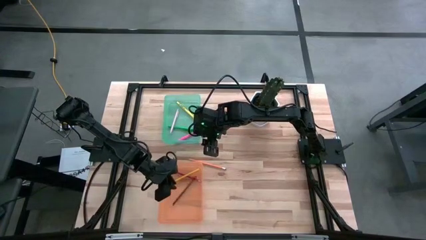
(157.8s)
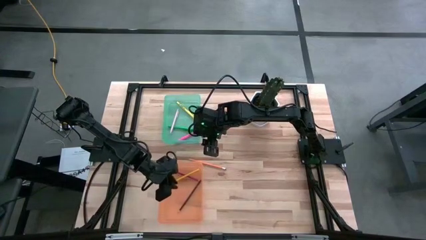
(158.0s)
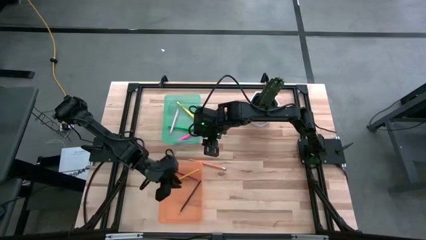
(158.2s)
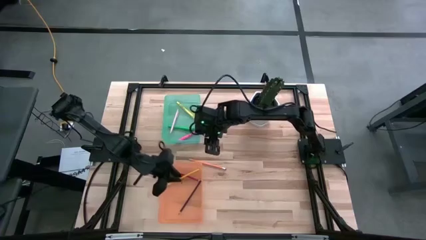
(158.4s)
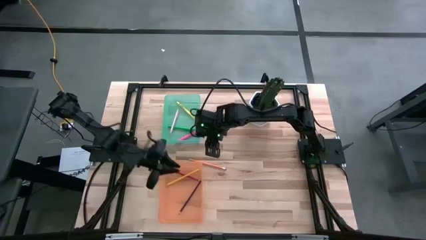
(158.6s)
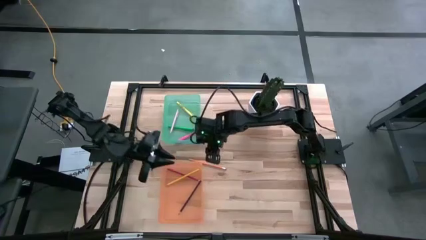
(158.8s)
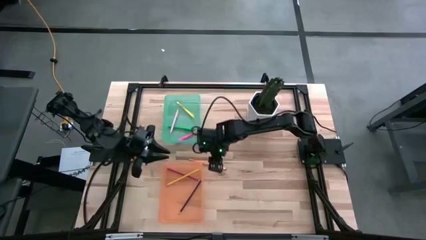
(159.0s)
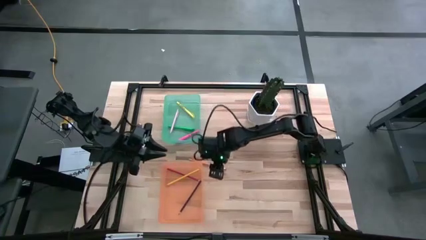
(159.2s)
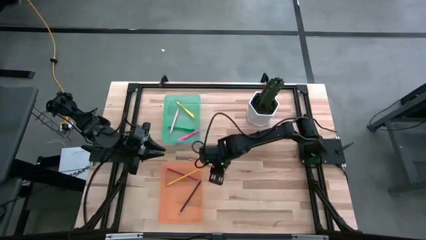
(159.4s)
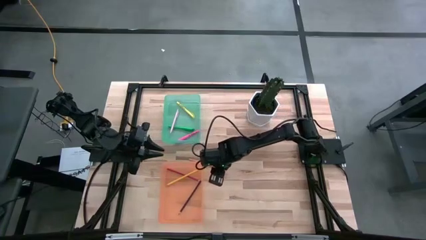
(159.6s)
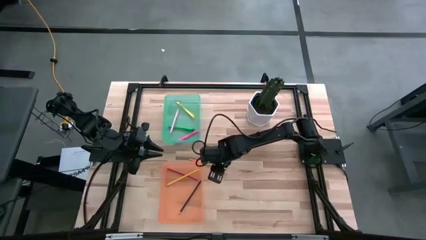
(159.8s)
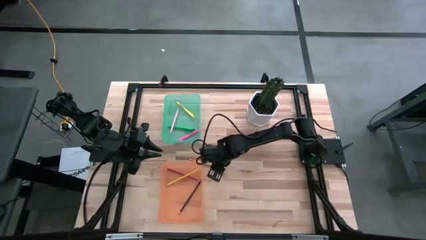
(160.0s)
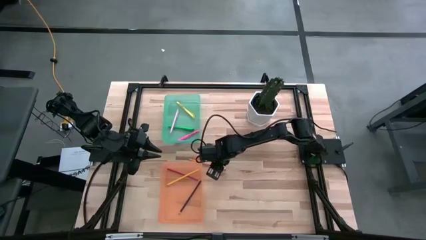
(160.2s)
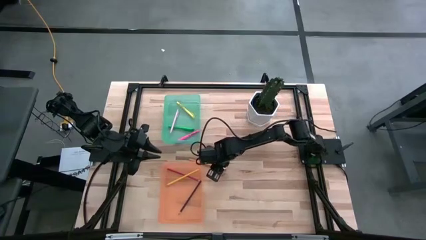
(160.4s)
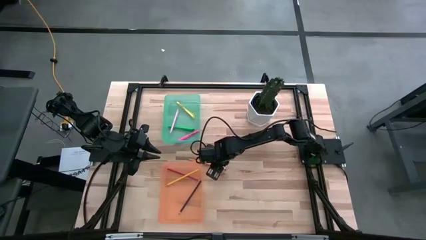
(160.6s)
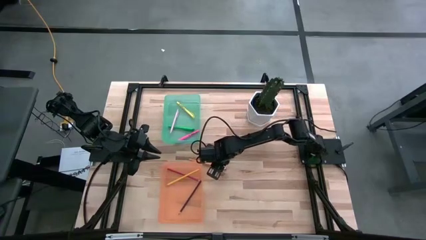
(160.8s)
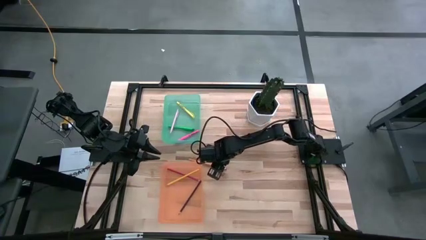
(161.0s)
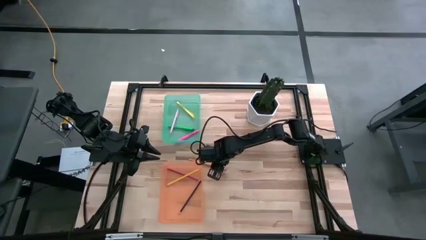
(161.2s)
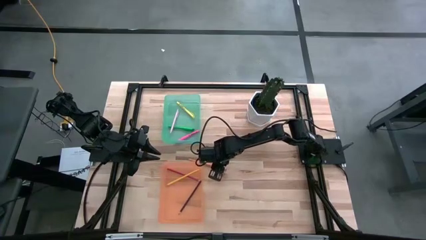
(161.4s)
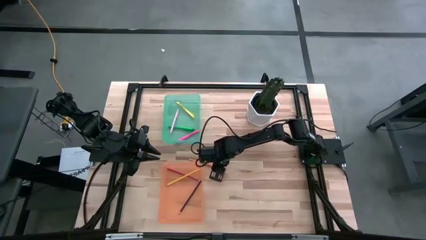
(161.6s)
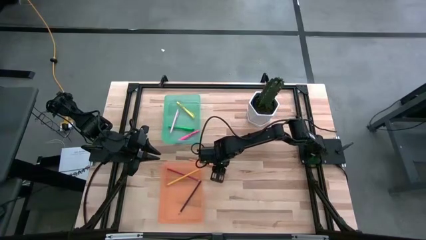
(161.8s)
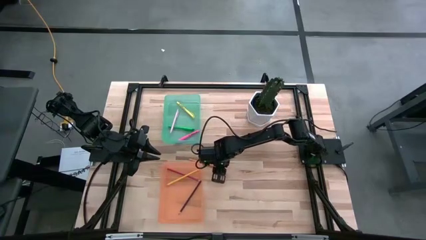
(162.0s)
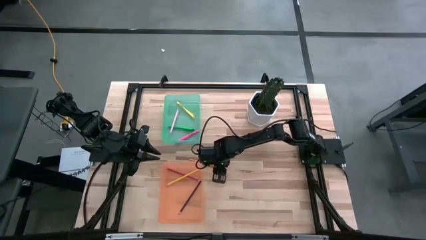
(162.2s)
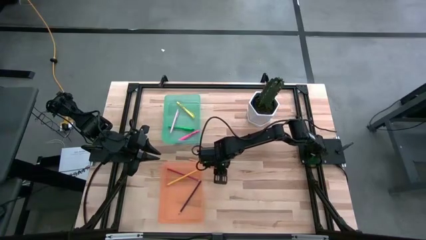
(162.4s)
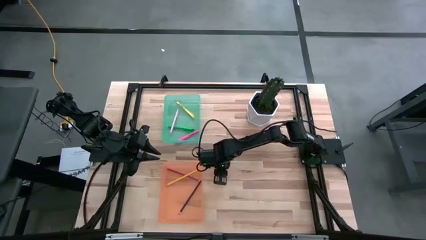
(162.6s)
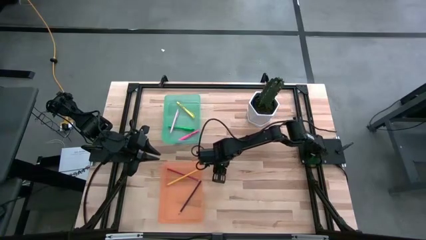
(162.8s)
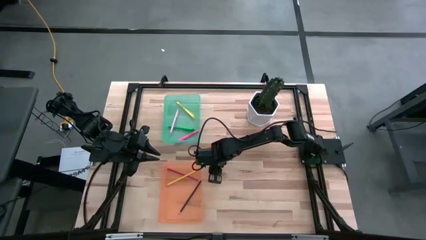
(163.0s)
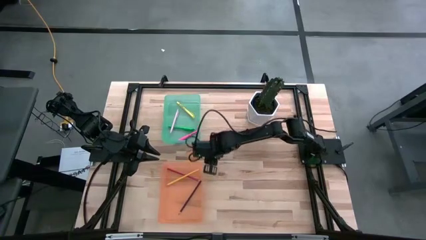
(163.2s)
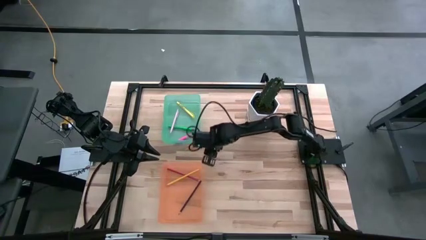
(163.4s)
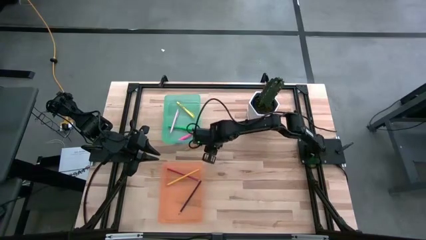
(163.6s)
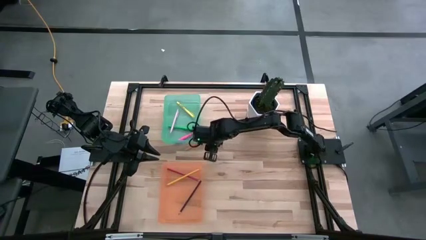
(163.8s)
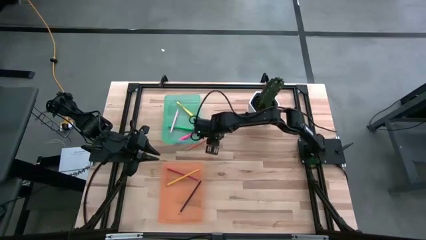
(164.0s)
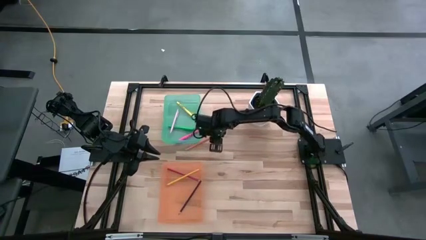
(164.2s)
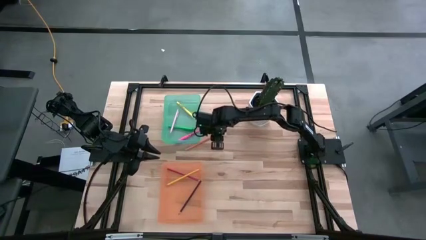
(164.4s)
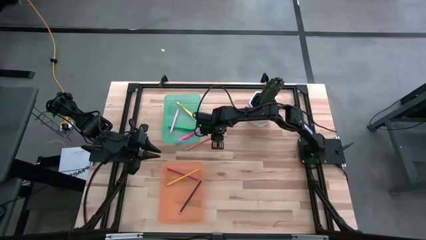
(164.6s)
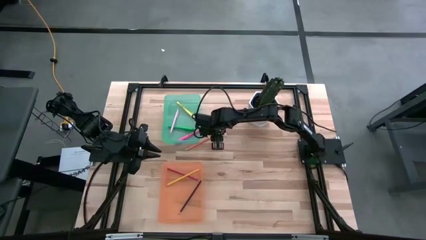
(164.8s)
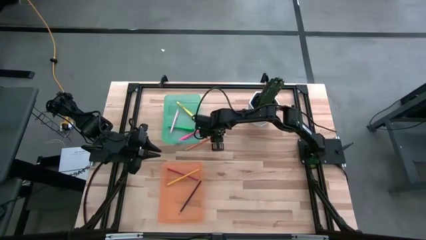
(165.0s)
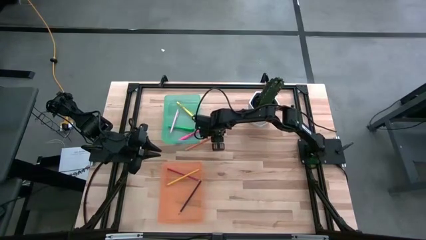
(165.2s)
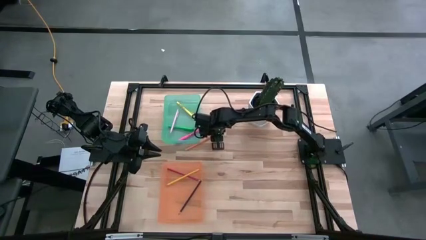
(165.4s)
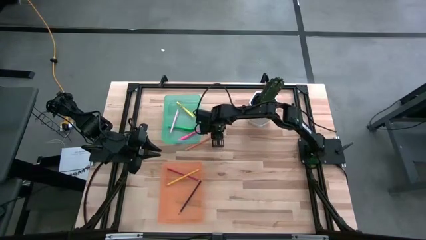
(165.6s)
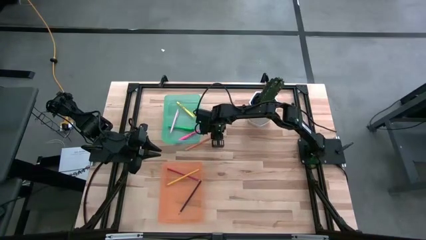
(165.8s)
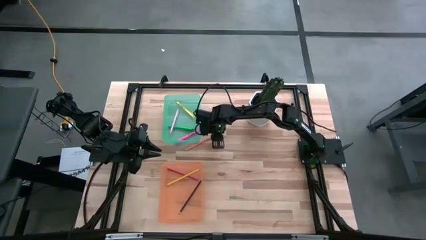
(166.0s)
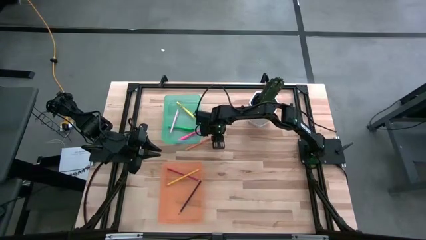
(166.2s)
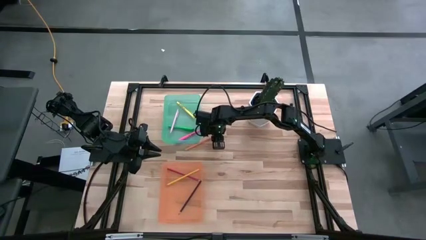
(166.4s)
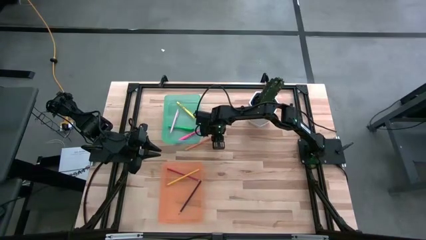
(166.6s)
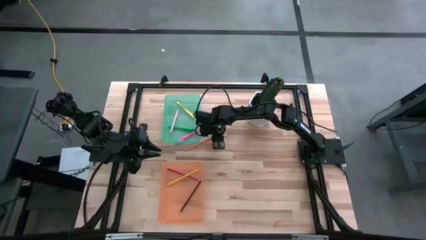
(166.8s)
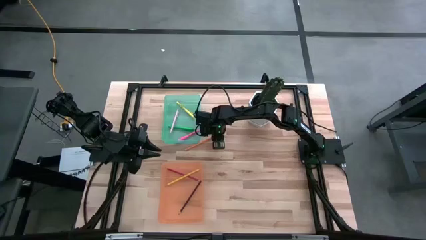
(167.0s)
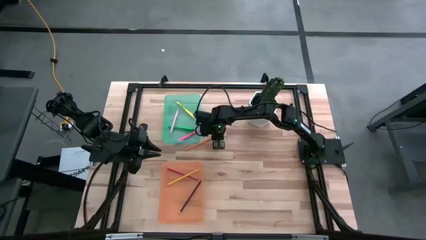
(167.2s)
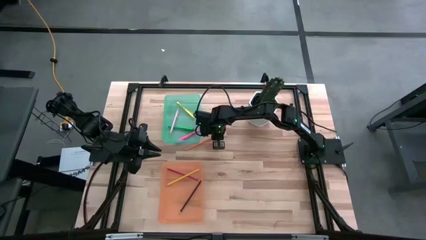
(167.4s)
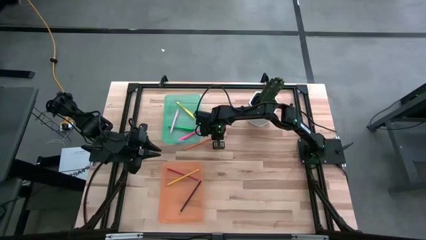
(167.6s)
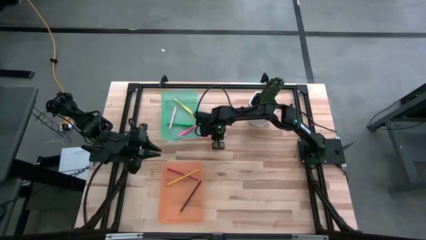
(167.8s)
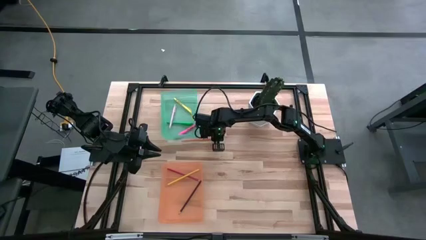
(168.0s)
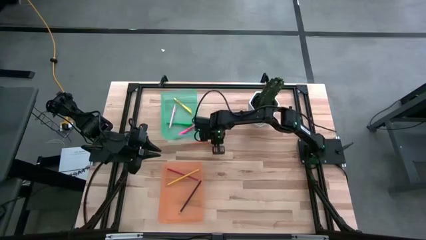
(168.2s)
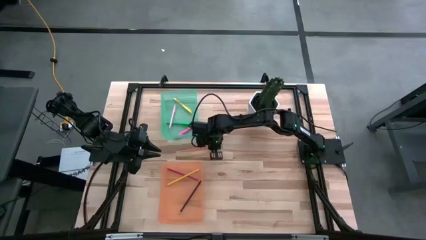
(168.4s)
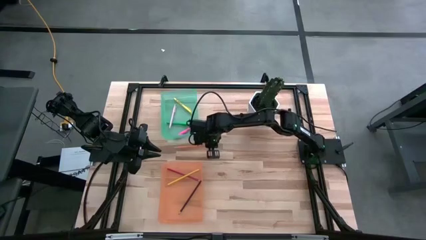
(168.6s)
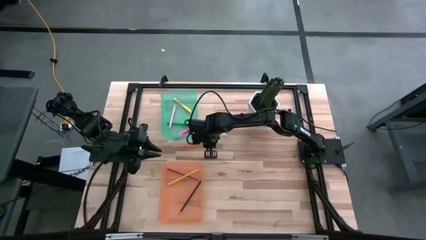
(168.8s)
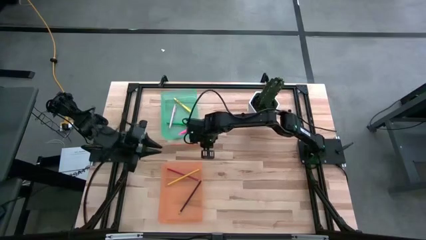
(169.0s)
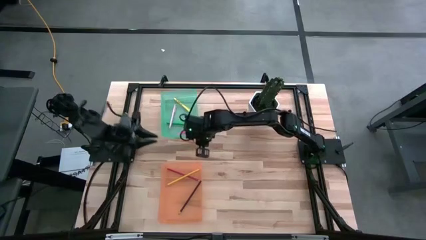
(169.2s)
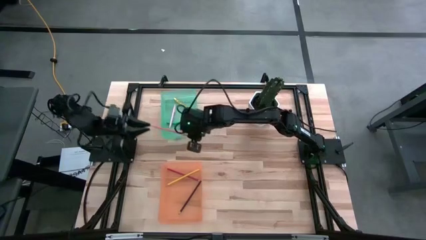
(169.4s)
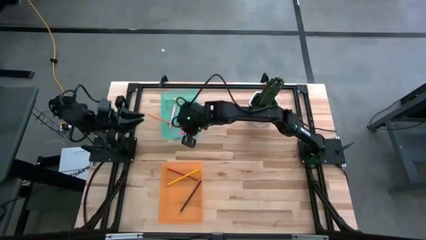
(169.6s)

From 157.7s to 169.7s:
Task: Sort pens & pencils
Put the orange pencil into the orange bin

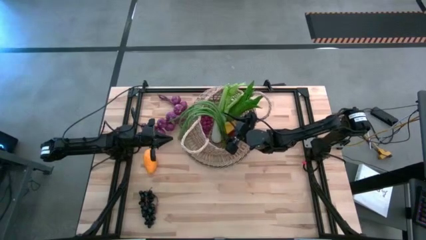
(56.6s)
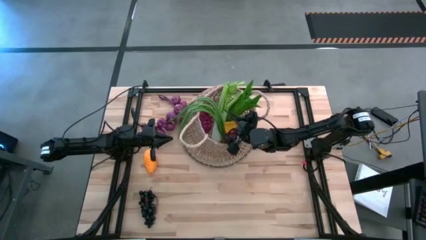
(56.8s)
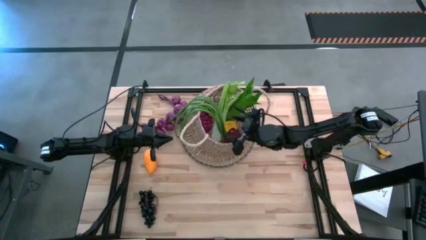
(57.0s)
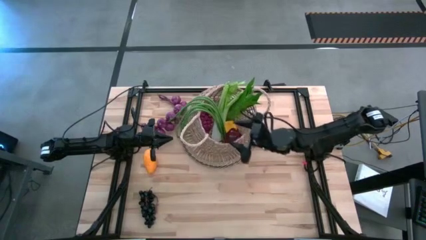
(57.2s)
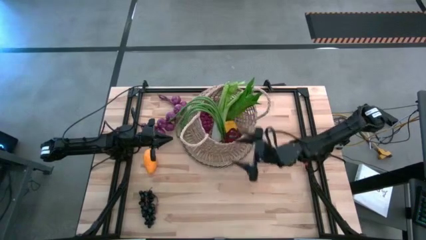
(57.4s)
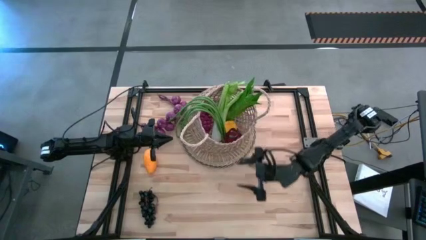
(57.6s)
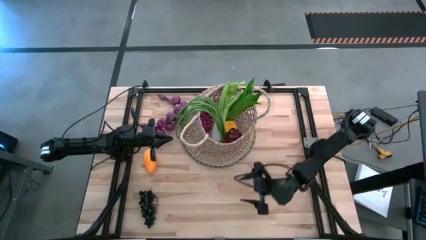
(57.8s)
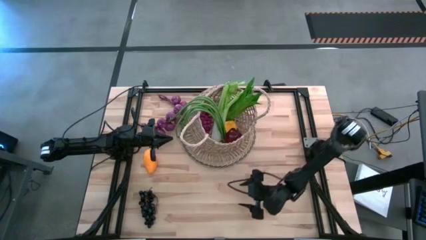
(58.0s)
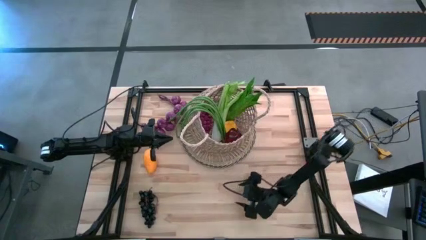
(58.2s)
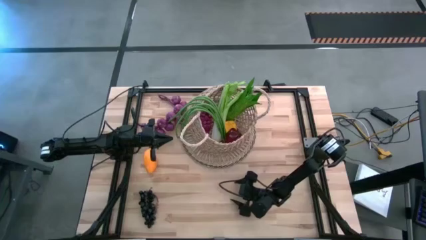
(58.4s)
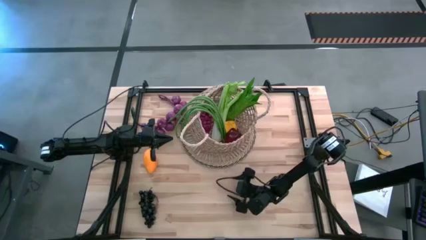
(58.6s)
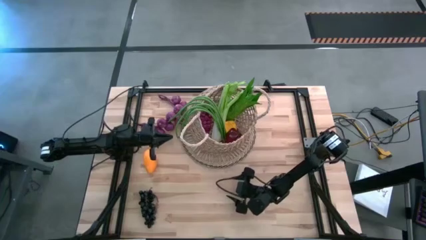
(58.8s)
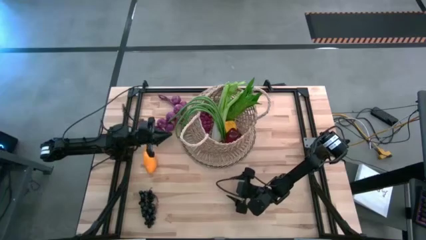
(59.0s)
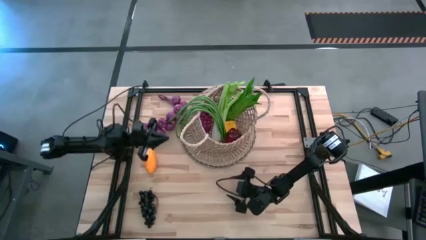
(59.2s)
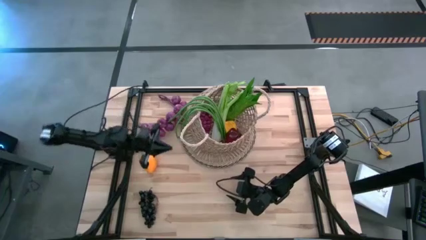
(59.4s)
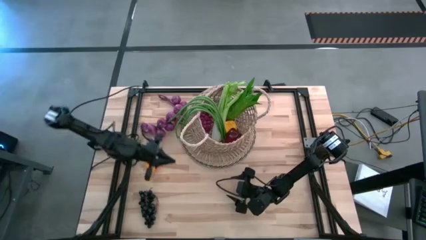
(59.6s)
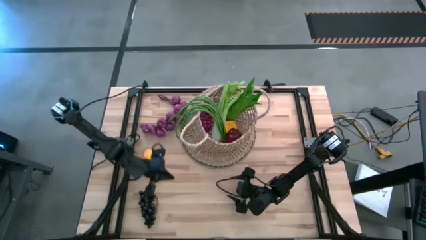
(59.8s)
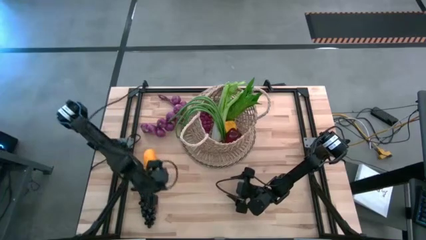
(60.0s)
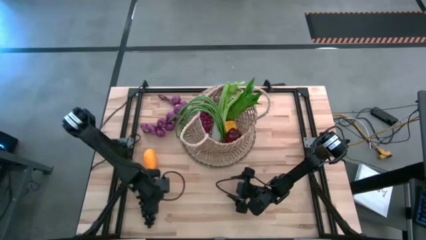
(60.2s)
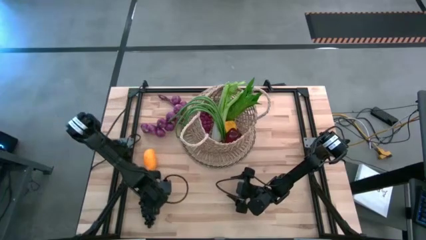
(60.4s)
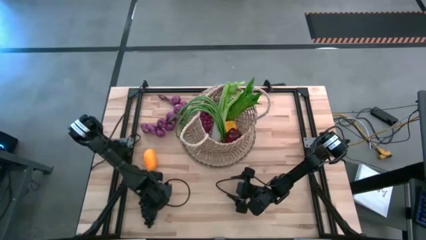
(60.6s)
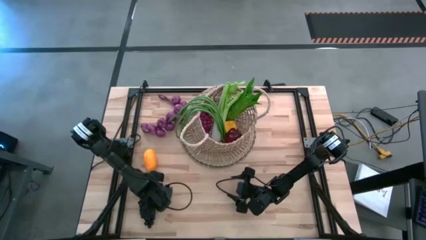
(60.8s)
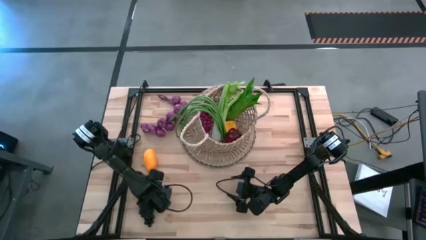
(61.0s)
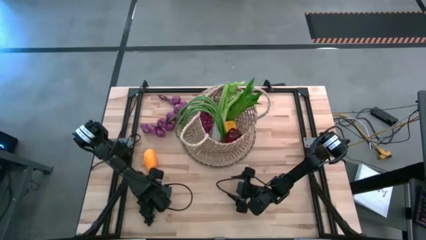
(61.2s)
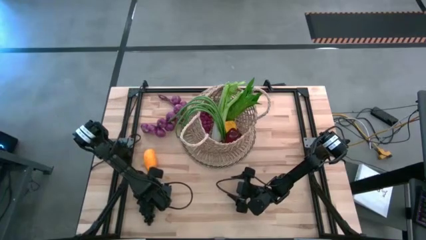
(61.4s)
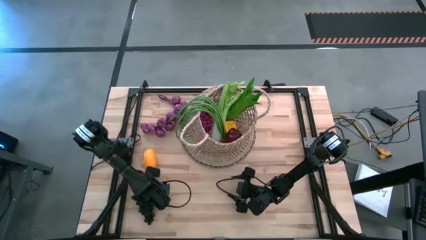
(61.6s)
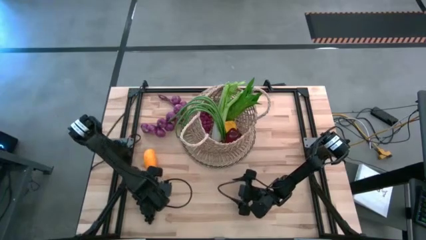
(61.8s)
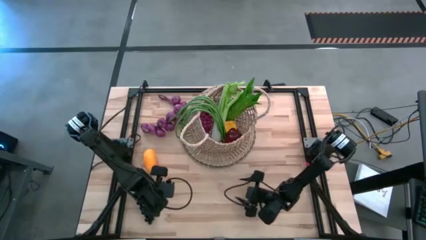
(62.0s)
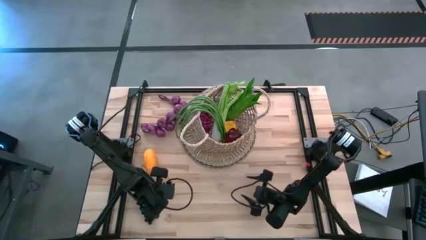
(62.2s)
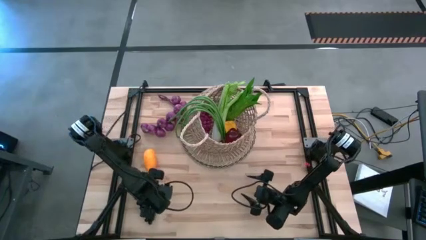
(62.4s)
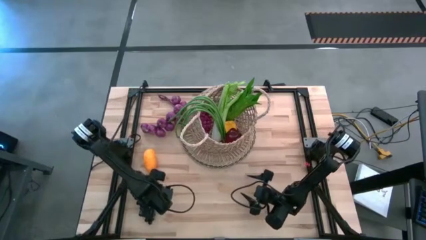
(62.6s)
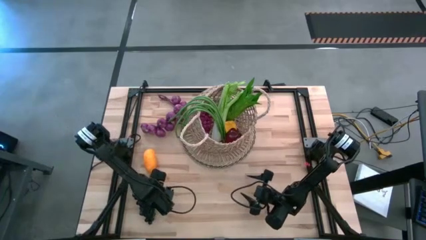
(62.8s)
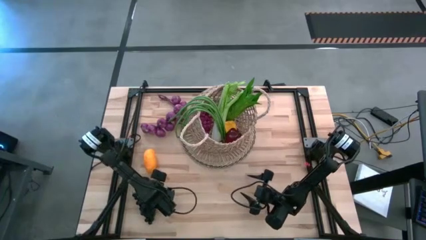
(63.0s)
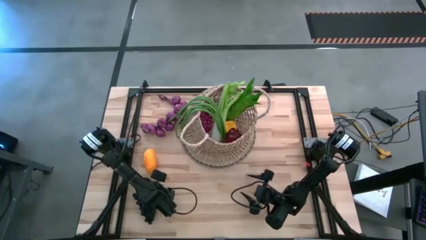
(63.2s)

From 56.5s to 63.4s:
Task: Build produce basket
Put the black grapes into the basket
